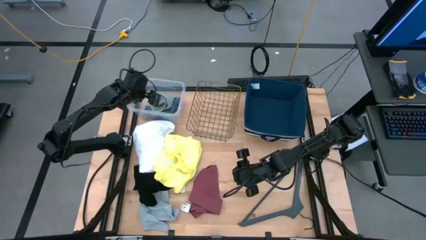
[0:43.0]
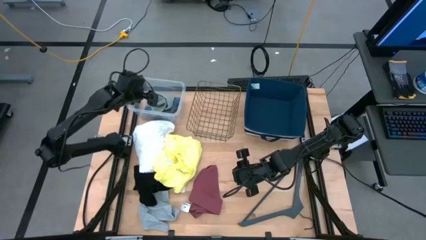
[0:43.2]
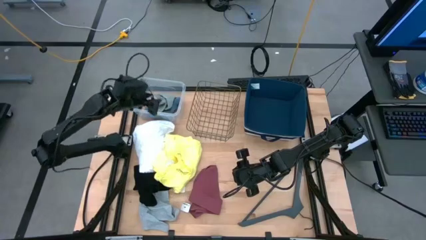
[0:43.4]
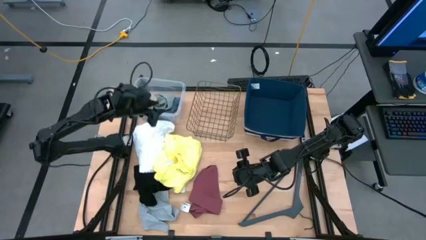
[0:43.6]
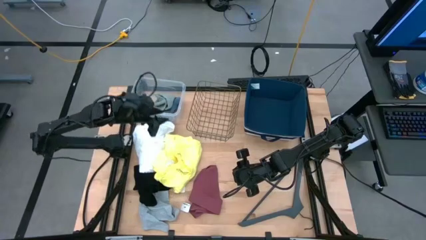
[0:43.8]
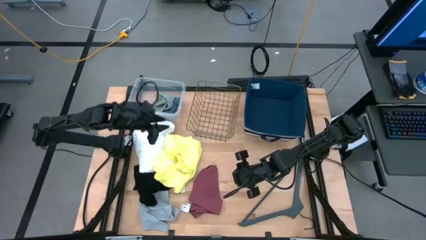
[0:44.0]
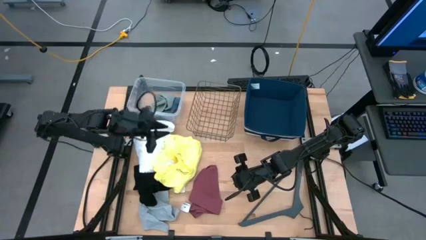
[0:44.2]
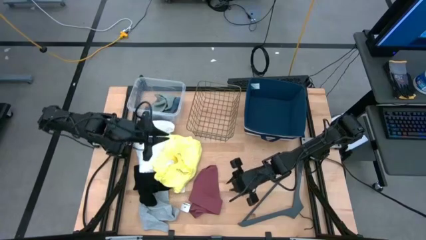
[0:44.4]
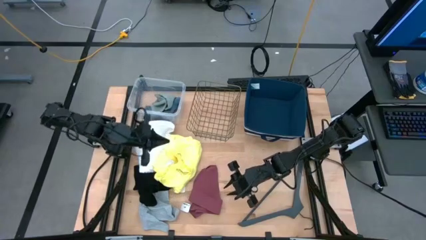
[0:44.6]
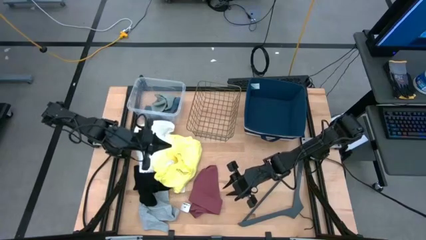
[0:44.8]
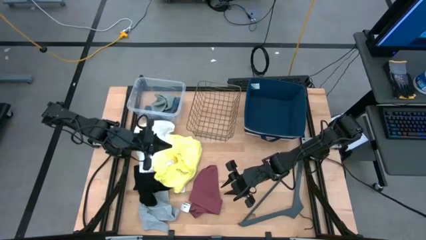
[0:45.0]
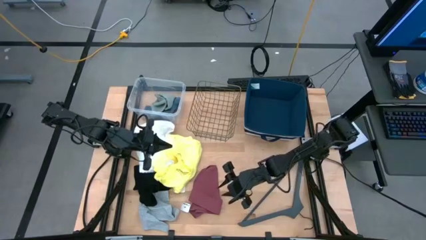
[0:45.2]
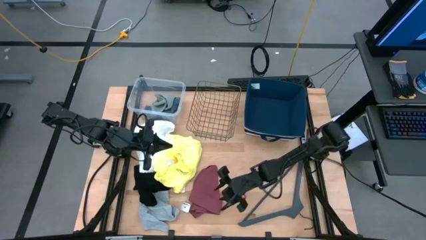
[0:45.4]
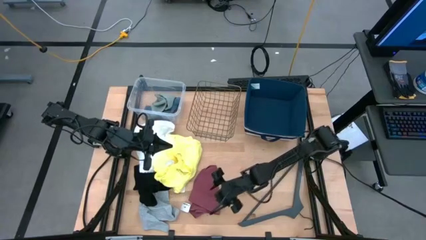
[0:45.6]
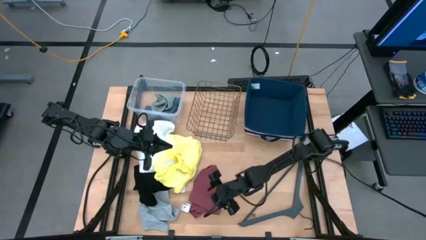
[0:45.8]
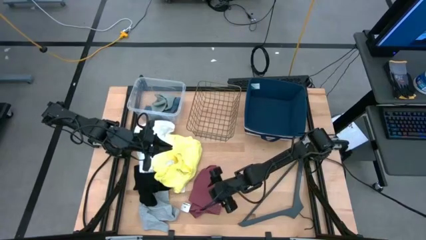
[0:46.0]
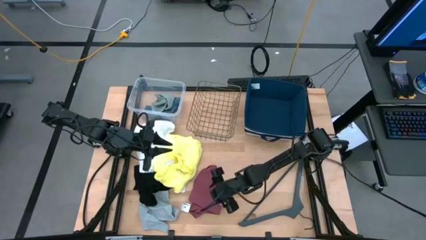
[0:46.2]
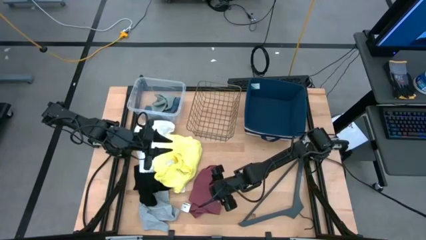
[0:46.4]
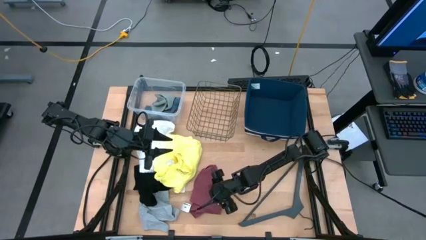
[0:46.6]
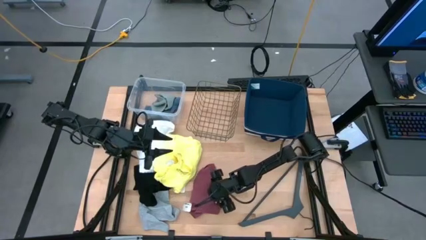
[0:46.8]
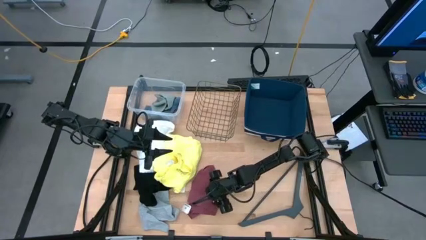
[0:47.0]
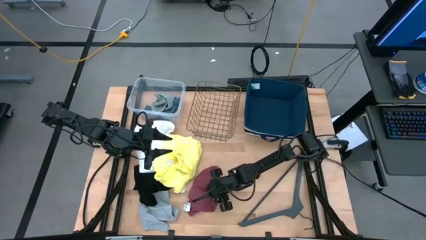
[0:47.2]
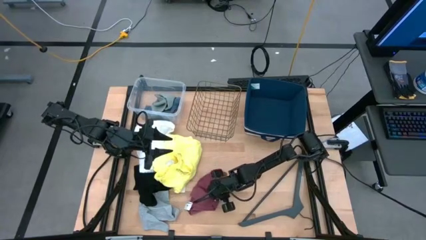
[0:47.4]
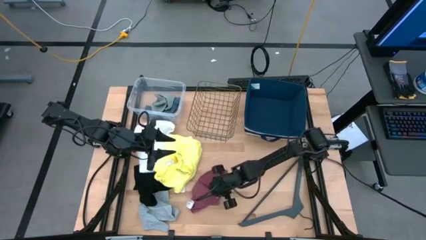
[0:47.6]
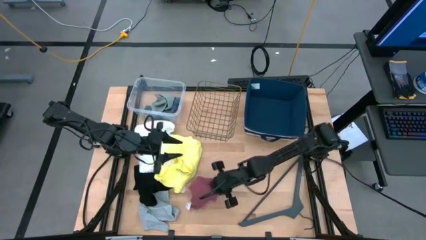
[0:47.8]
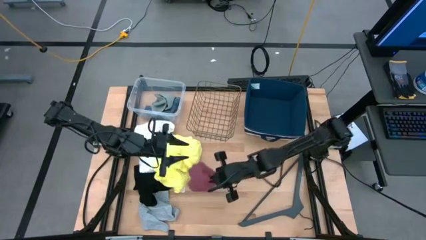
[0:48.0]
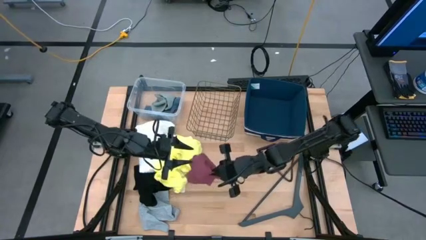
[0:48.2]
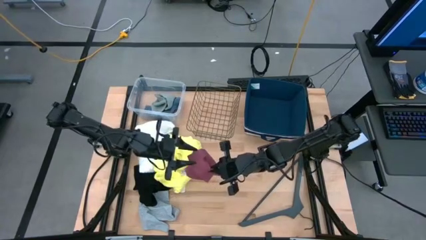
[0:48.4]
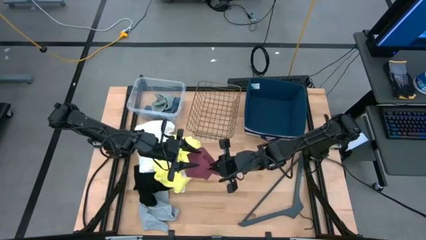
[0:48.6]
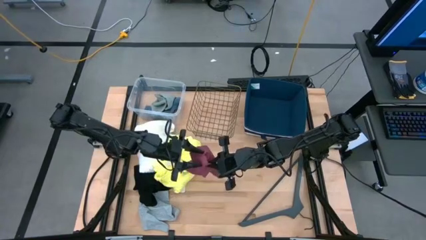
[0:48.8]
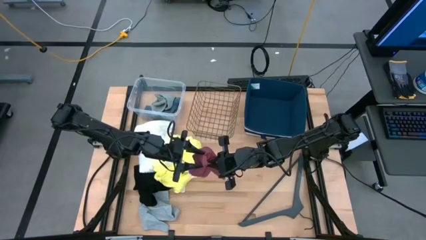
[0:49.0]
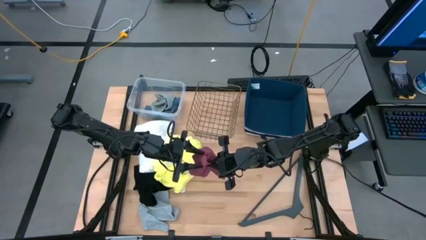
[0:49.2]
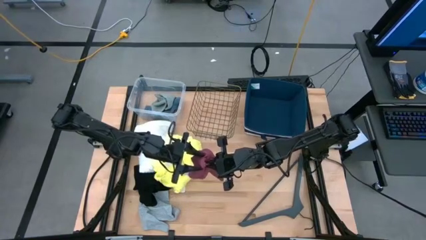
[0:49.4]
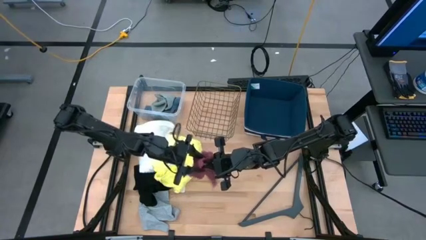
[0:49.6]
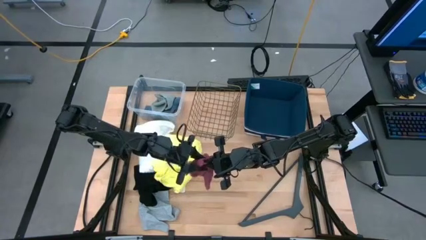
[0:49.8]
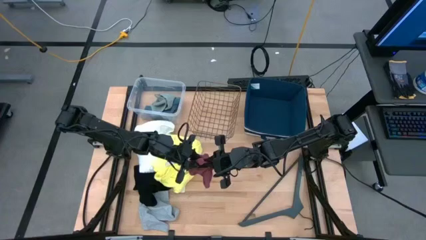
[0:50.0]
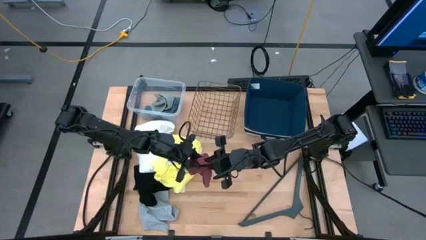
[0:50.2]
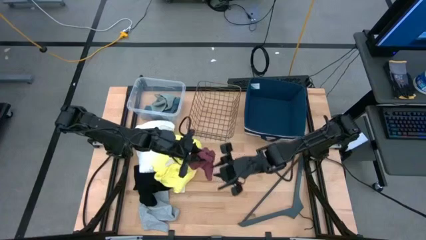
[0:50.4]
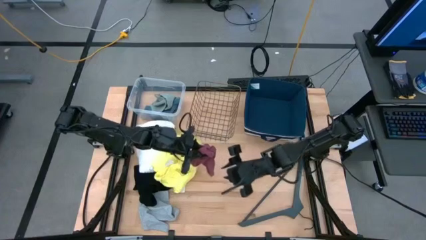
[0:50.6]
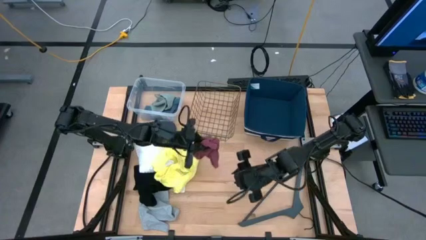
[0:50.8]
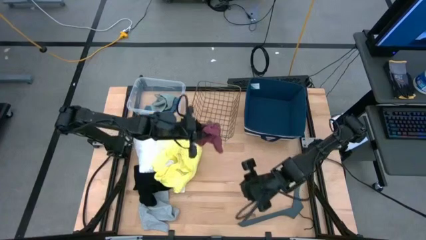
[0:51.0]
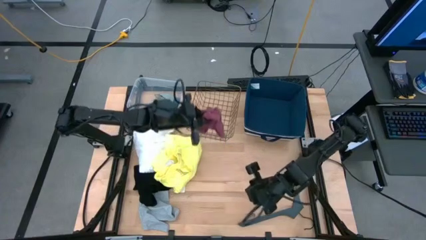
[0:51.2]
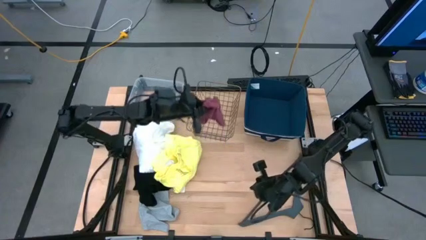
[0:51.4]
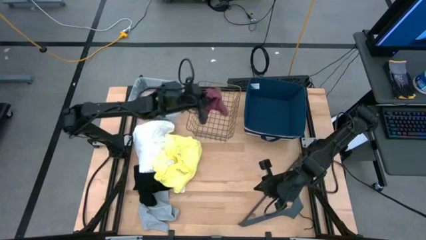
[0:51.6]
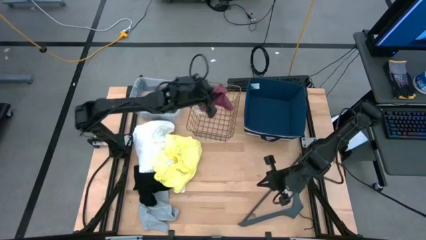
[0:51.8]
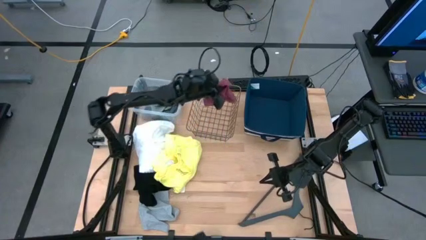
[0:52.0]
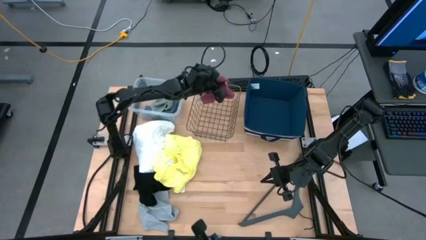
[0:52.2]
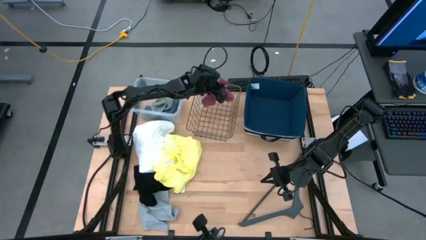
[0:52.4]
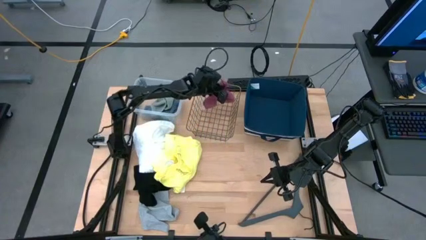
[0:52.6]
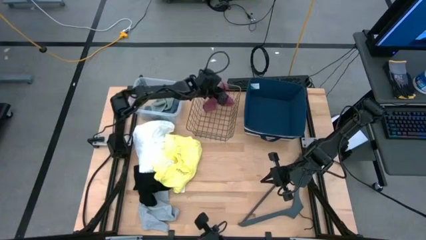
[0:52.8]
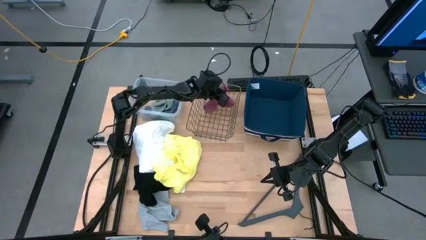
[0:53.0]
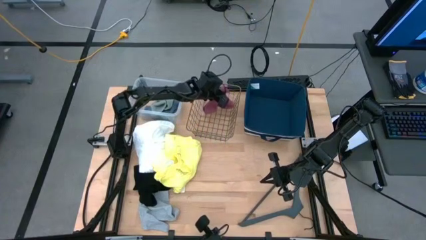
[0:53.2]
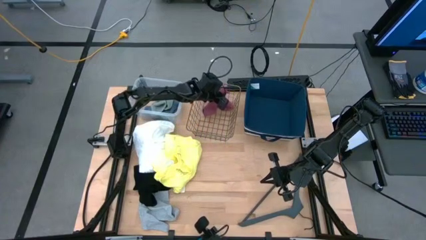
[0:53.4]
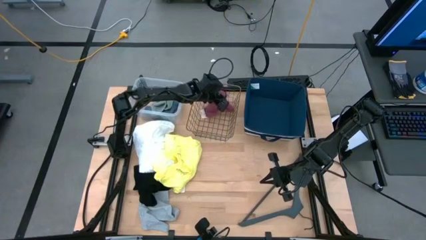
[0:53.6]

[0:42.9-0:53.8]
Task: Pick & Place Cloths
Put the red boxer into the gold wire basket

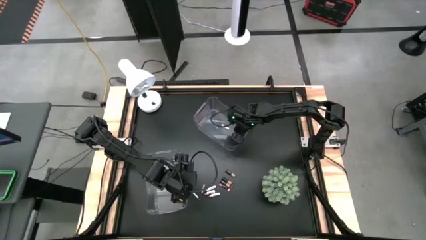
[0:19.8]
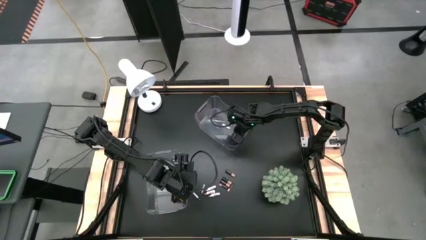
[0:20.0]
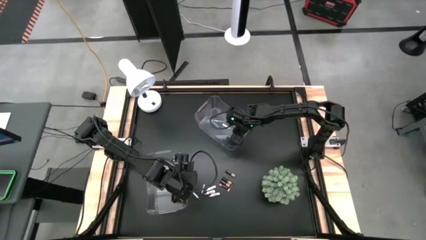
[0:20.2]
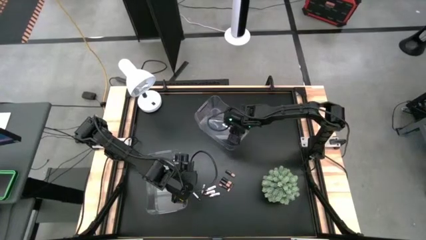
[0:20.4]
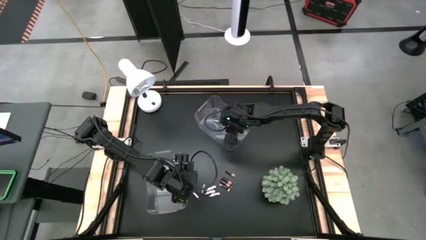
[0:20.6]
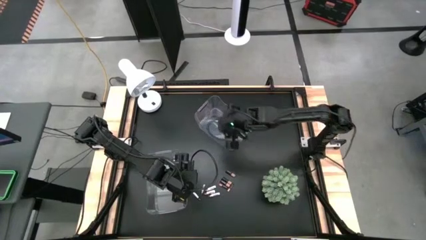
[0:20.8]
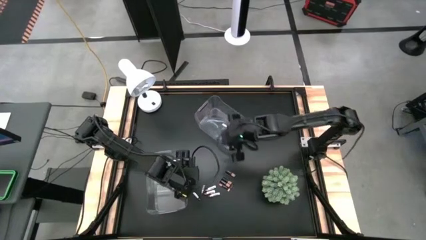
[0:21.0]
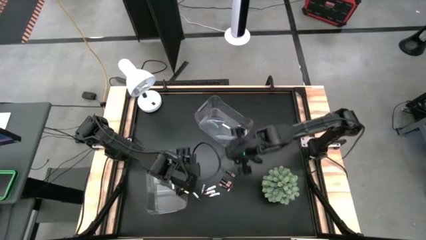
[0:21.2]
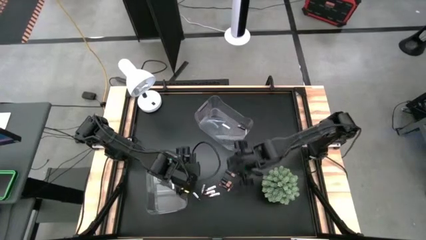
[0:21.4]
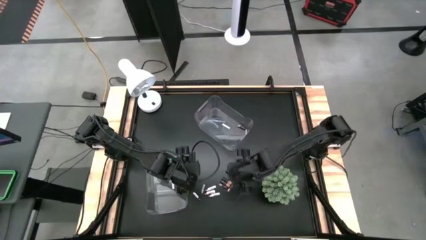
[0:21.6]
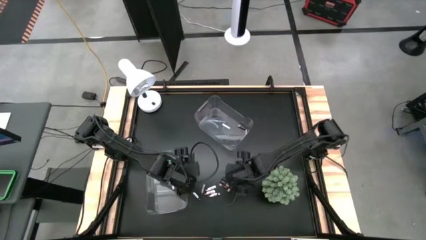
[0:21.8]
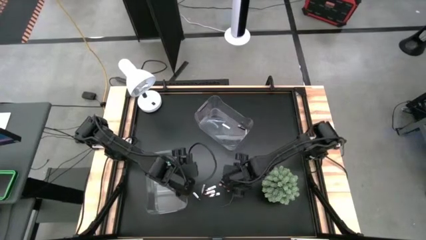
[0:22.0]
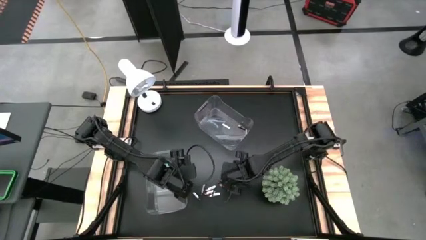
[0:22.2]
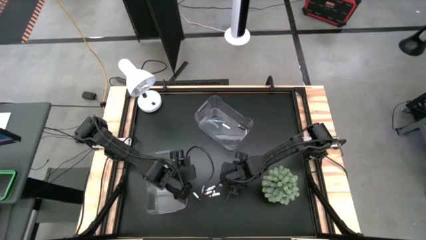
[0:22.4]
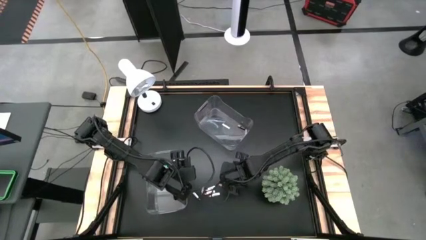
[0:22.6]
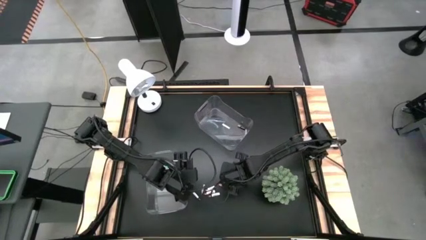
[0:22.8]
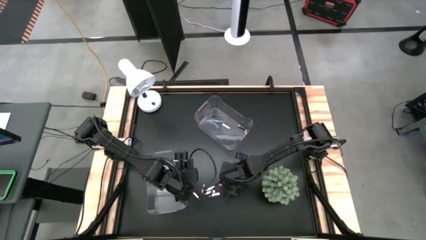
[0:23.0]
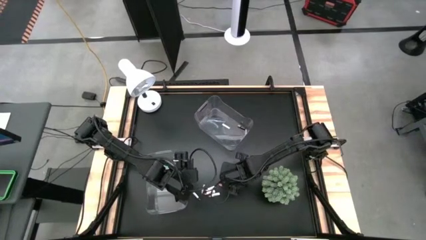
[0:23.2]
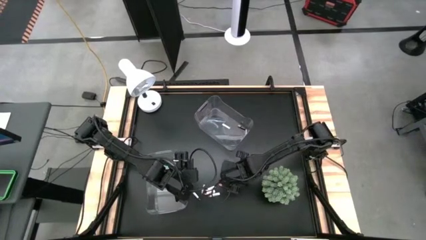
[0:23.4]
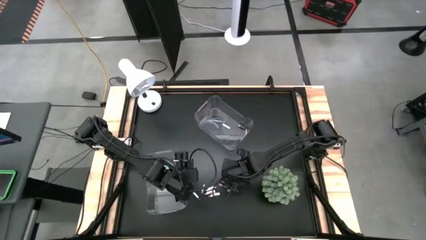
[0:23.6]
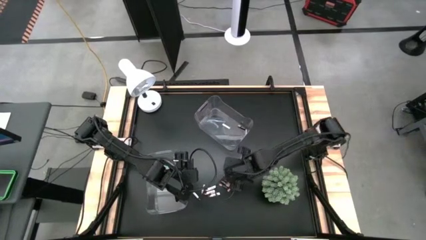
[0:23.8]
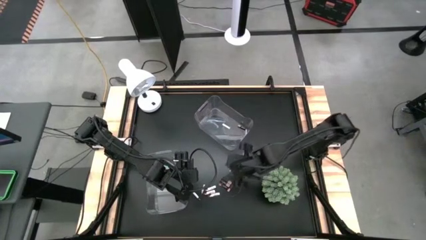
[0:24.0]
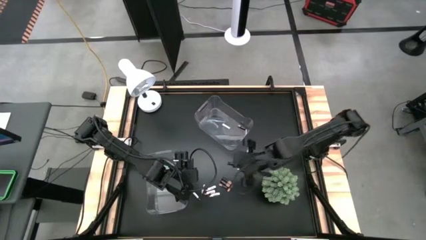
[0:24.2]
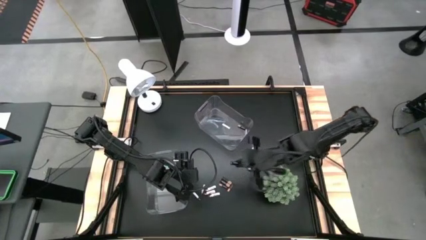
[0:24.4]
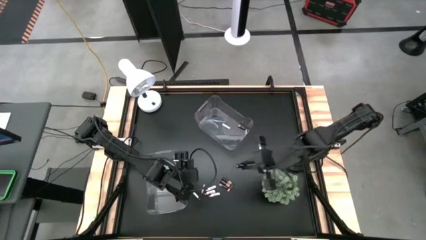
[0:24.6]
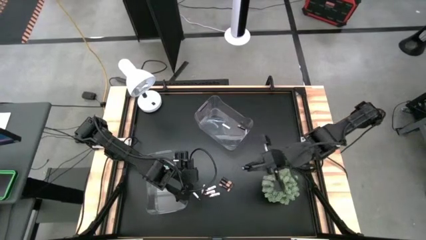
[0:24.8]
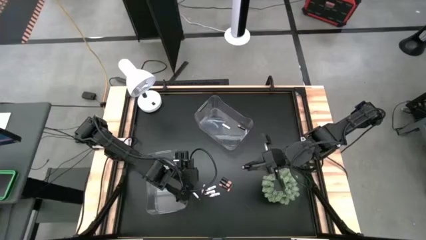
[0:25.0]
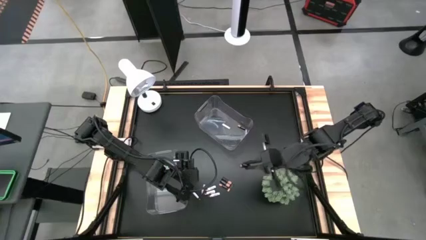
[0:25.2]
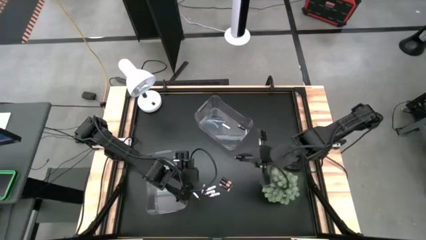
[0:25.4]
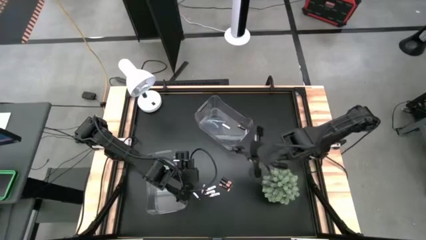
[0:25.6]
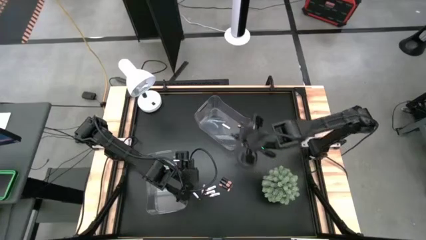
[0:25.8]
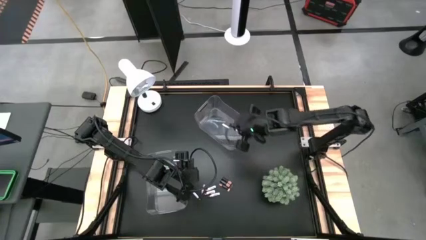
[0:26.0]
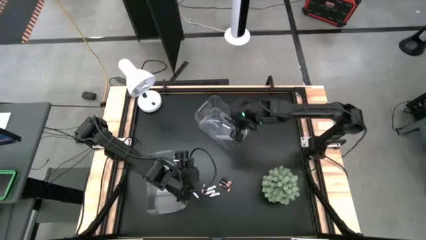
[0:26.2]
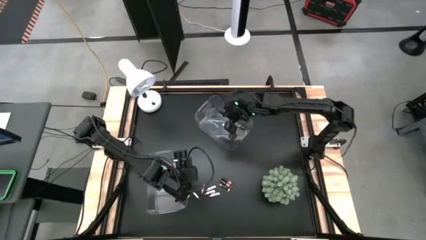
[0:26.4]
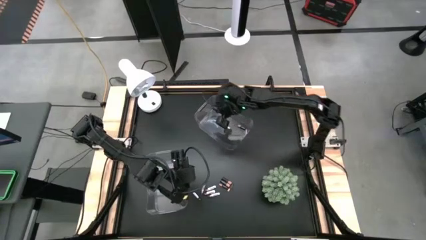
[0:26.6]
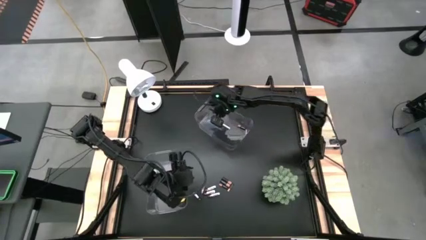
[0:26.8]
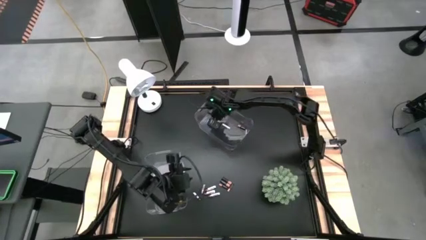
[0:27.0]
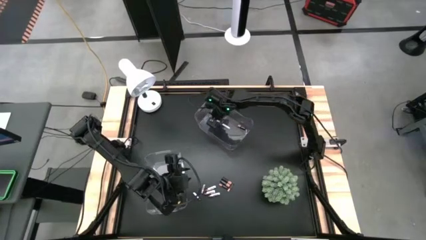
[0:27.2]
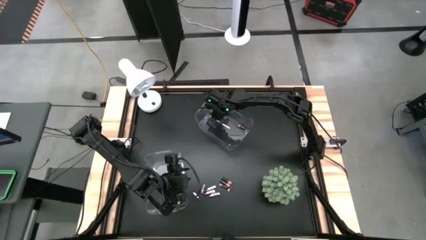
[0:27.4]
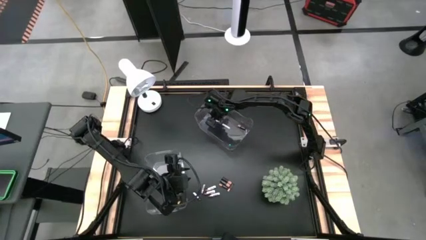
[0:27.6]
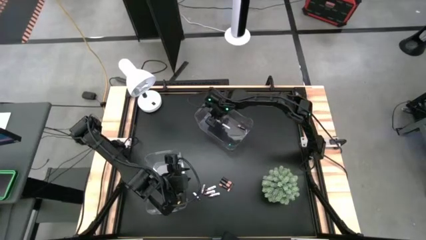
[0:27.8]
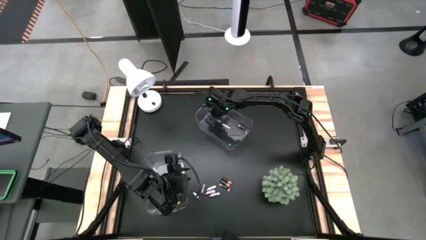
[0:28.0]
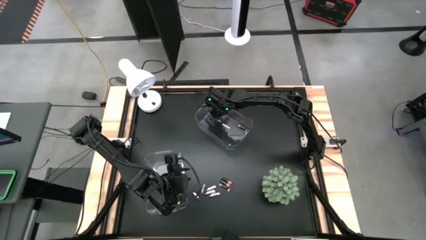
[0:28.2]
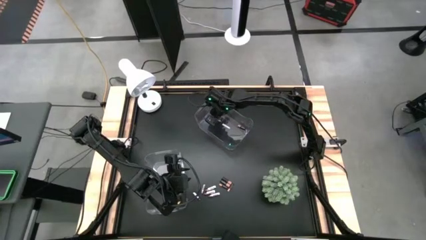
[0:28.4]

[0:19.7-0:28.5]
Task: Sort batteries
Put the black battery into the top transparent bin
